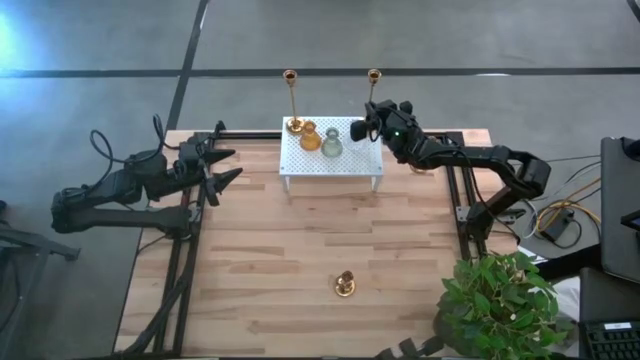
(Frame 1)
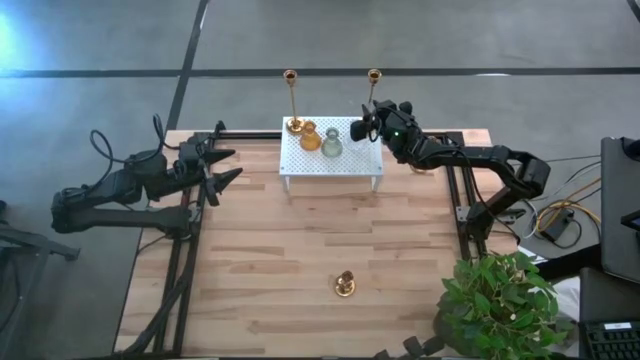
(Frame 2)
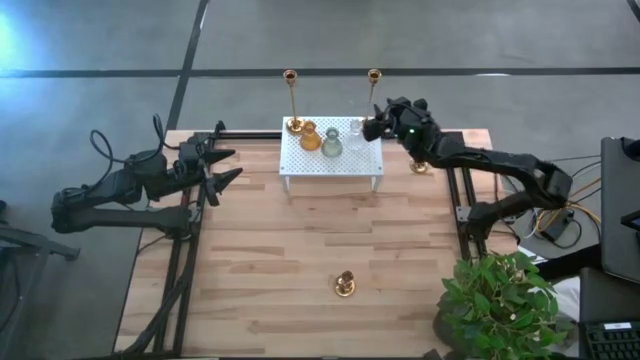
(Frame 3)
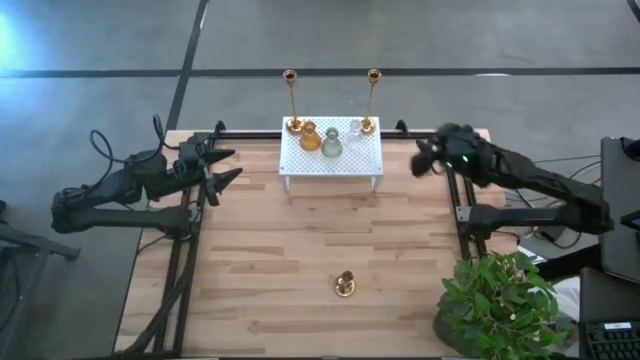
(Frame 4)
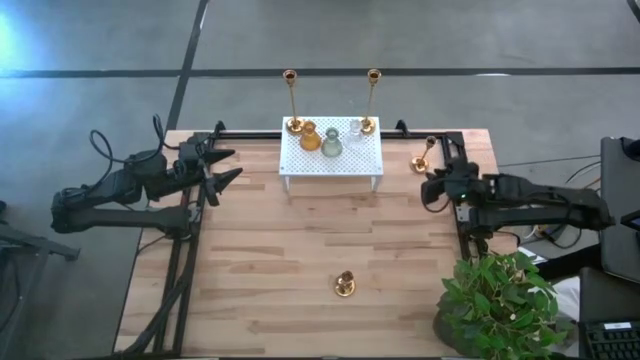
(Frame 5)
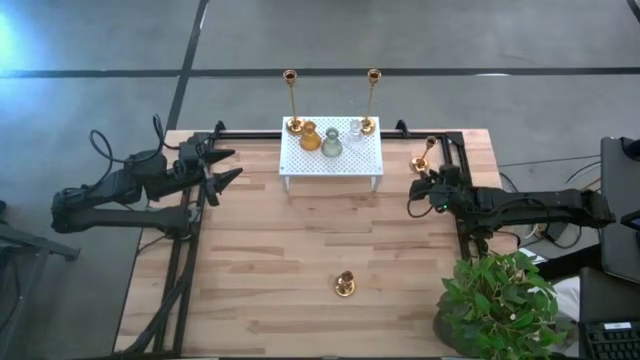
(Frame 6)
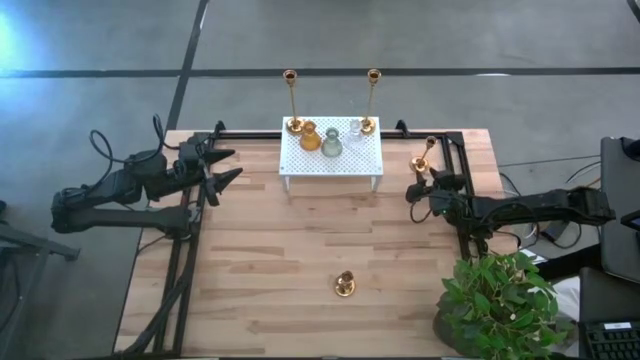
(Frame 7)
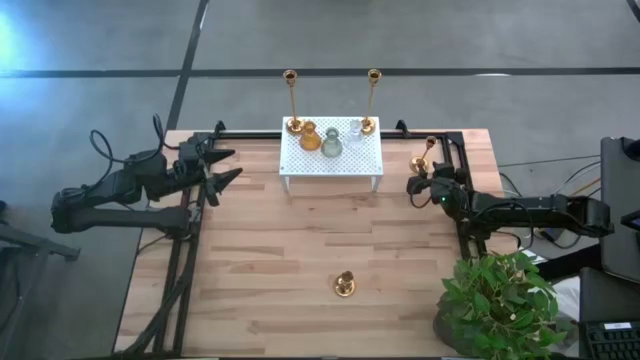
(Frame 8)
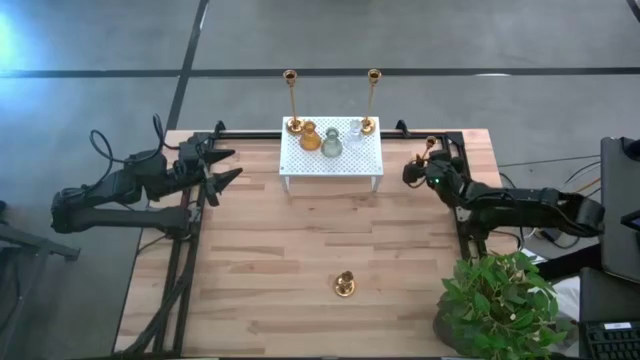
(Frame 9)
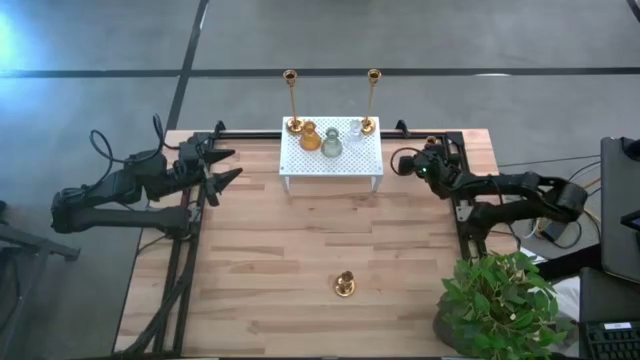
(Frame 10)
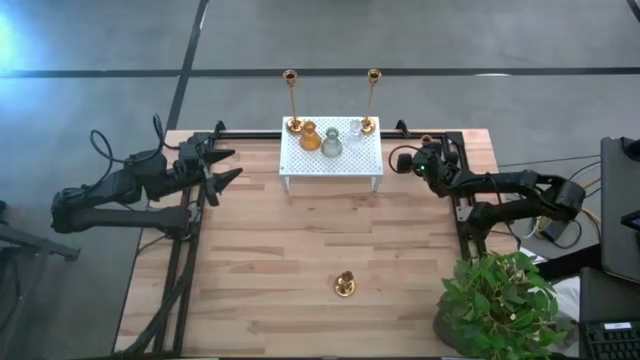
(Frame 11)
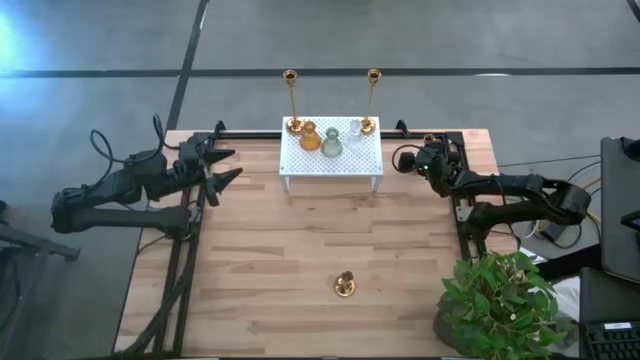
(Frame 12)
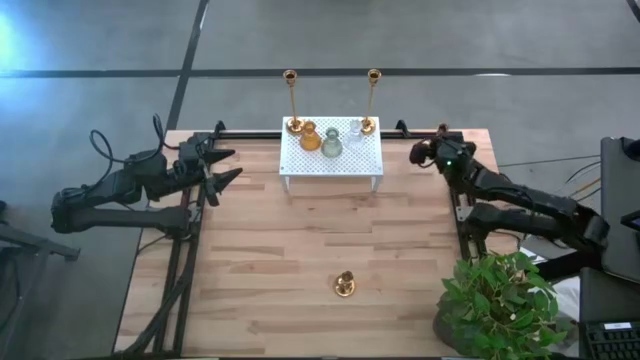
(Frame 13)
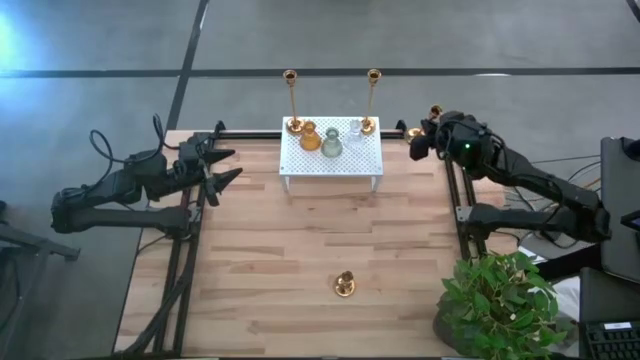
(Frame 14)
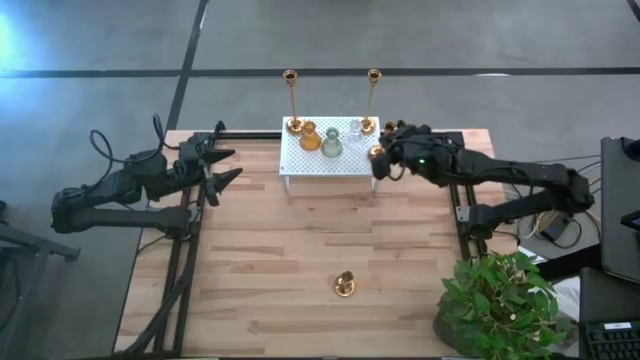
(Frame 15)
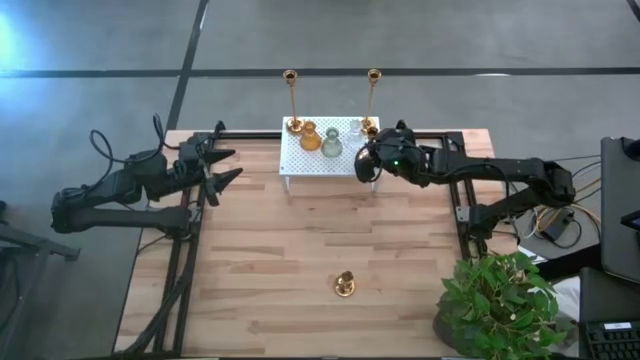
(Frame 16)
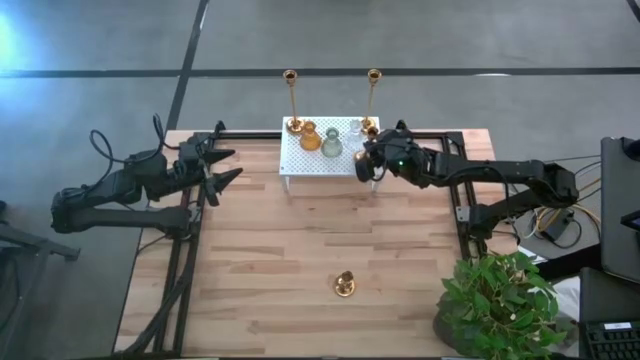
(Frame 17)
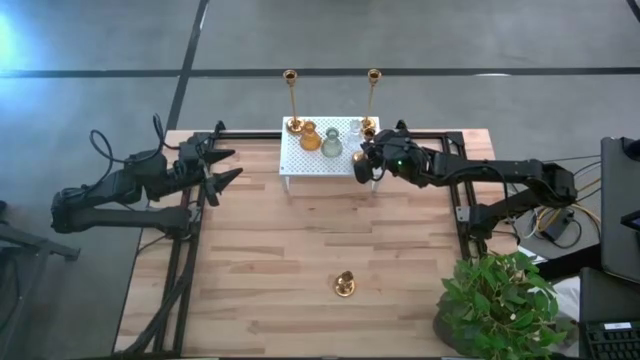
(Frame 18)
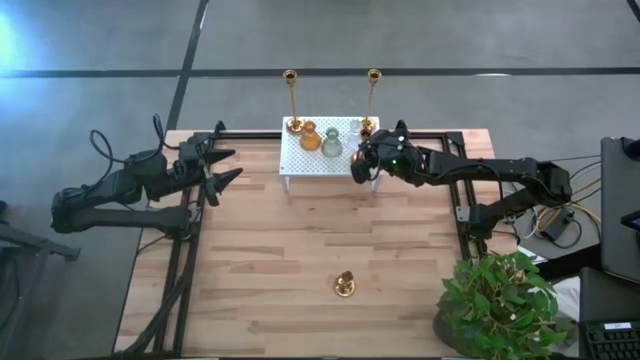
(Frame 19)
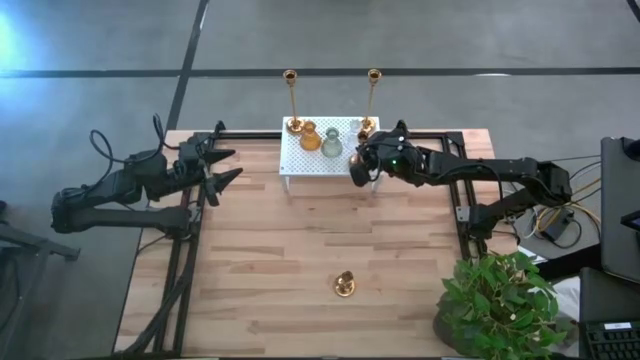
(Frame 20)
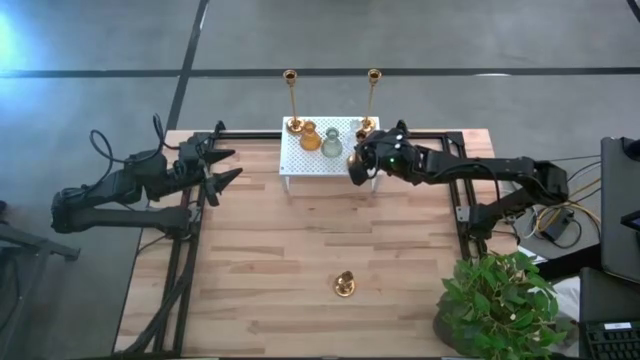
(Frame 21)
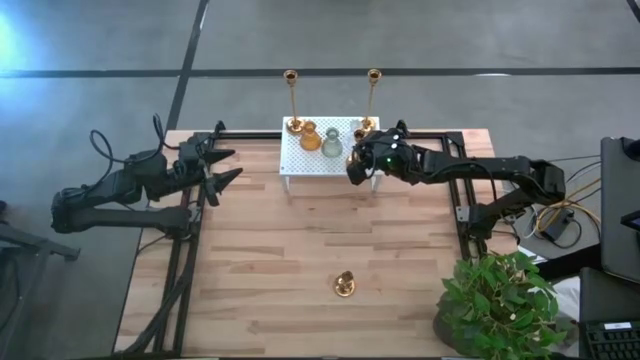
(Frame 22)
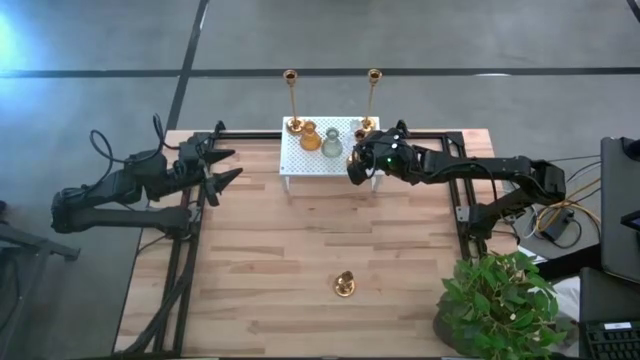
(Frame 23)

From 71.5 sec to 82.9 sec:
Task: Pick & Place candle stick holders
Put the golden candle holder on the shelf

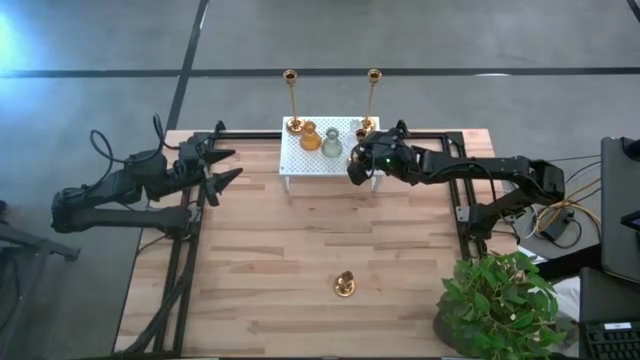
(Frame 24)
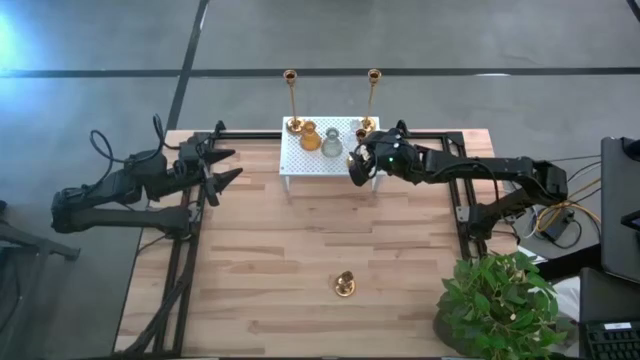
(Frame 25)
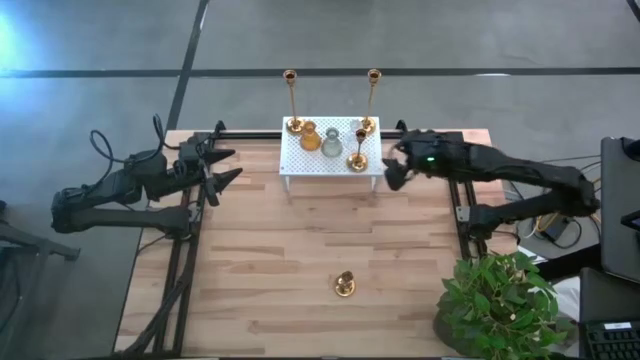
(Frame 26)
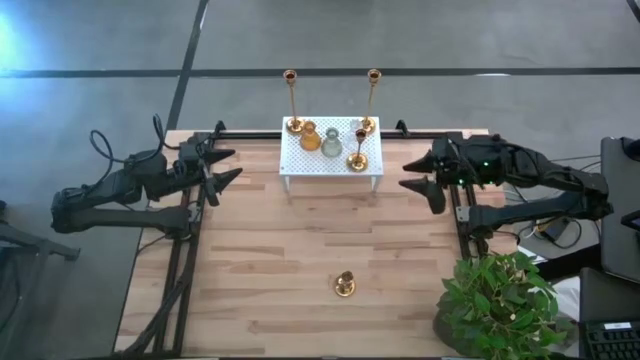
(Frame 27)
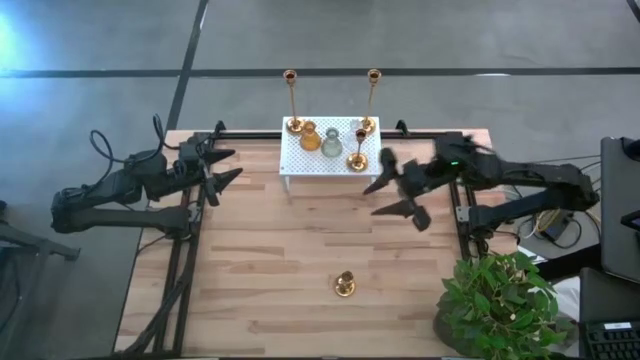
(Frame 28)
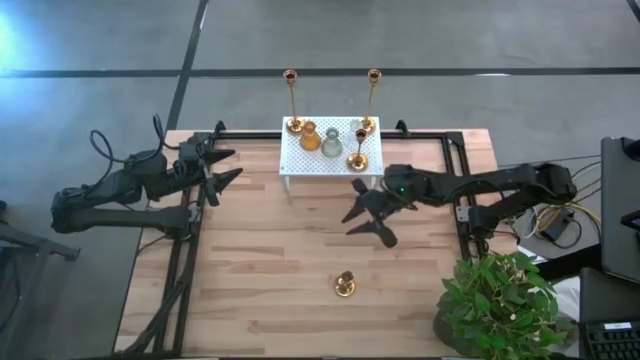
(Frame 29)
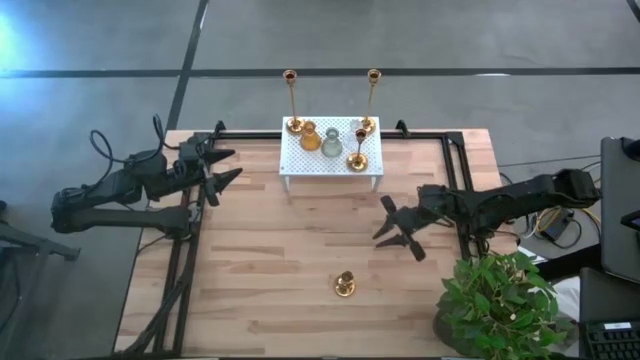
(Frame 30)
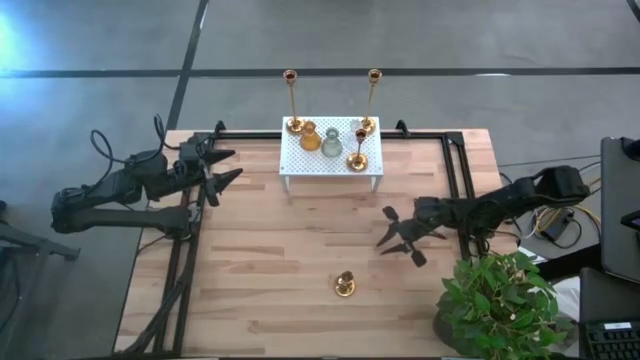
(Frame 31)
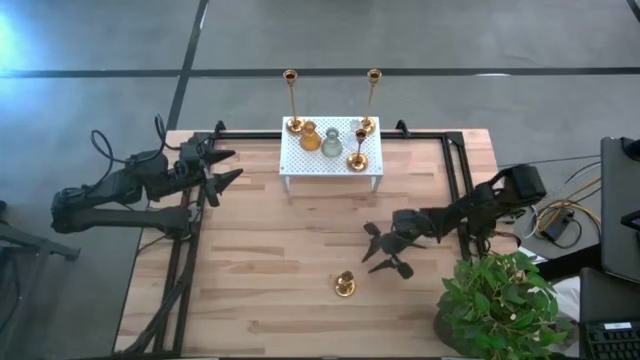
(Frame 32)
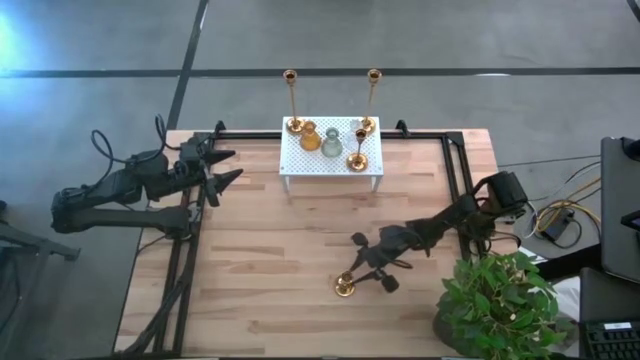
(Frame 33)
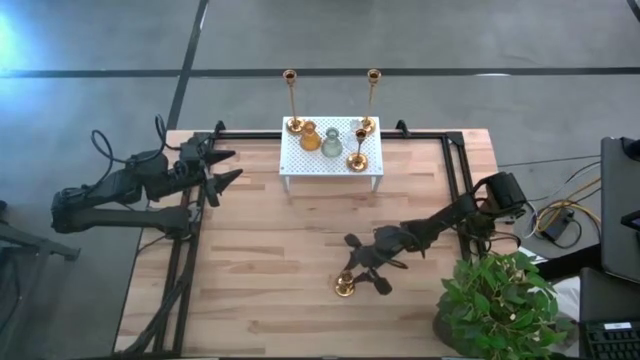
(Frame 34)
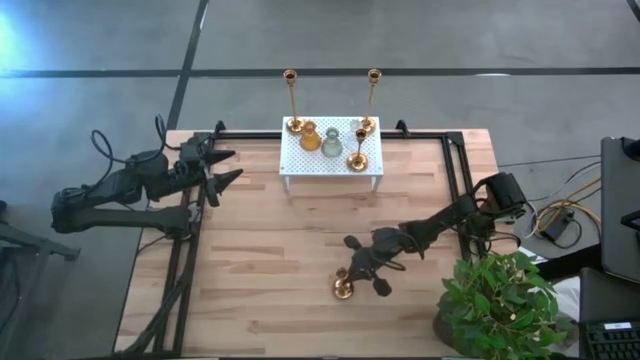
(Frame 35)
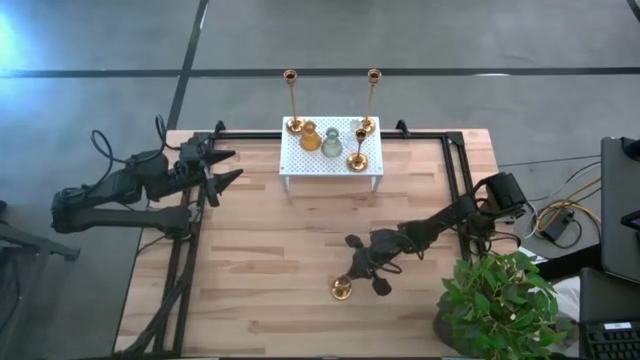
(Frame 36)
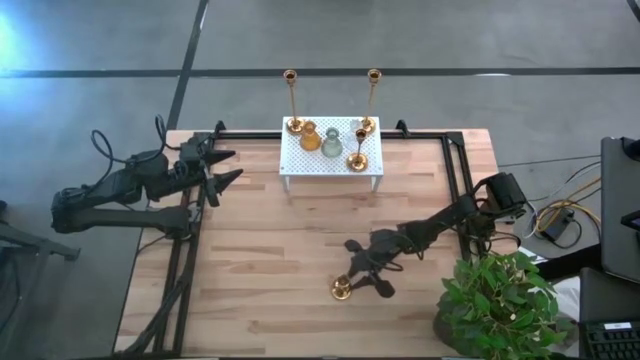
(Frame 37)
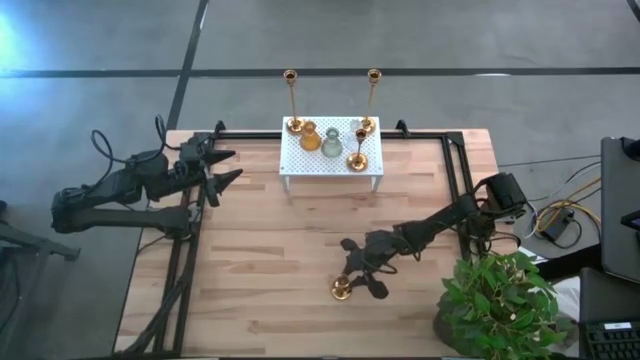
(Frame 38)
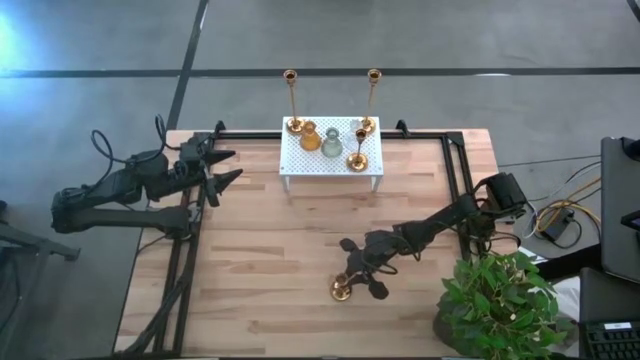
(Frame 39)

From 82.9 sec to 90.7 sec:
Put the golden candle holder on the shelf

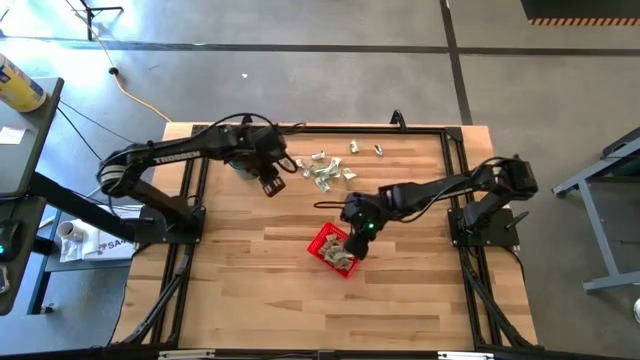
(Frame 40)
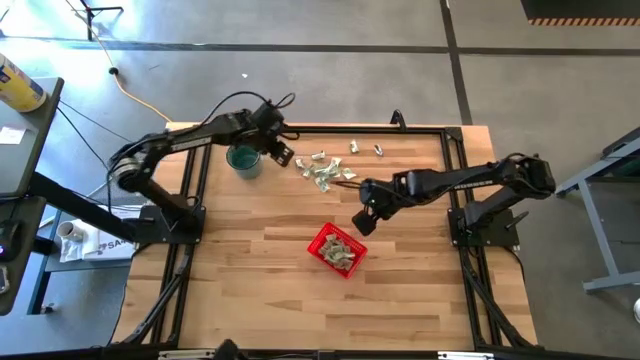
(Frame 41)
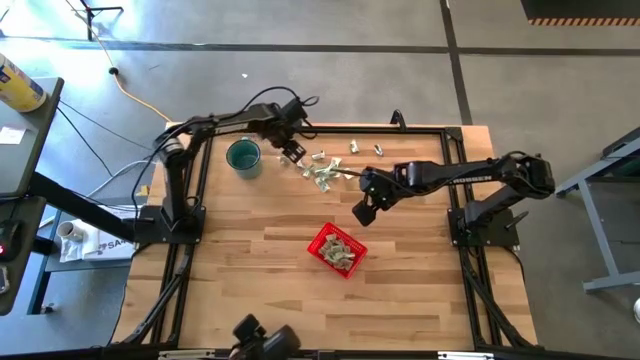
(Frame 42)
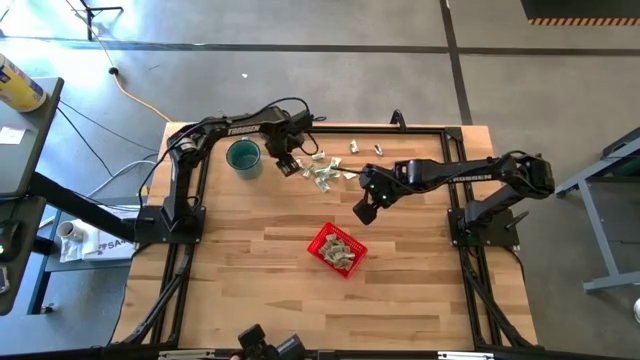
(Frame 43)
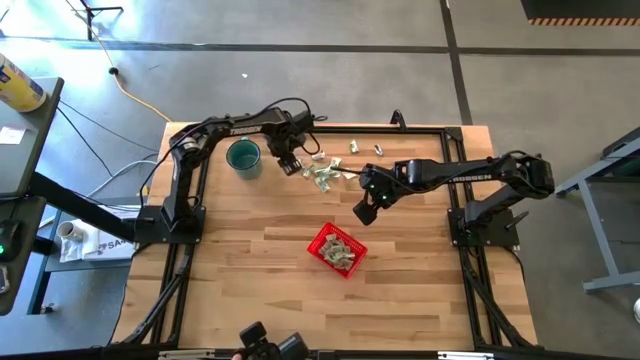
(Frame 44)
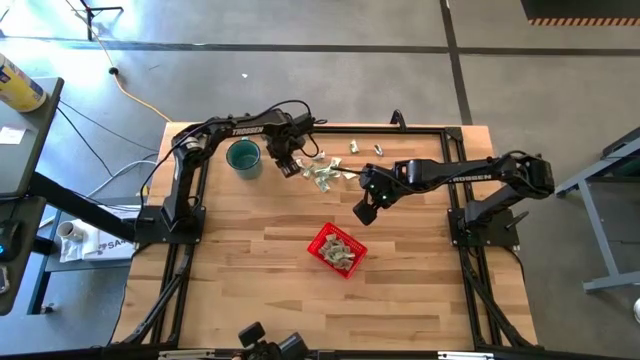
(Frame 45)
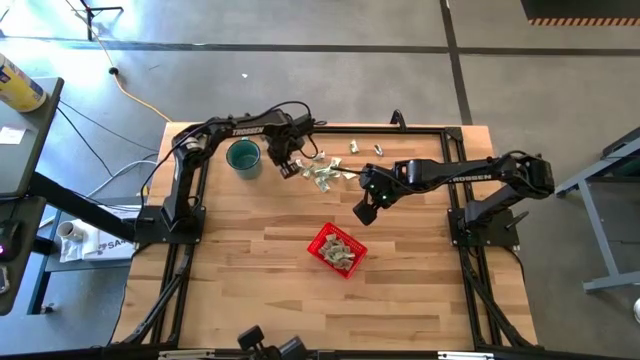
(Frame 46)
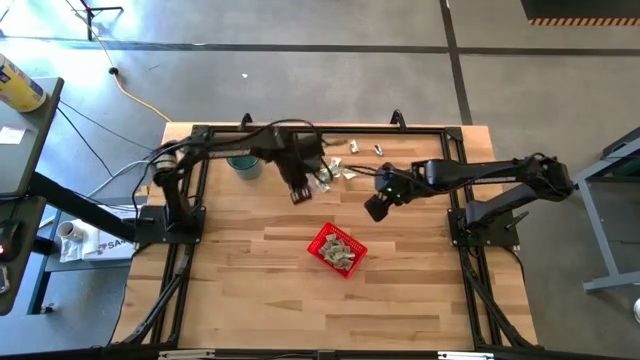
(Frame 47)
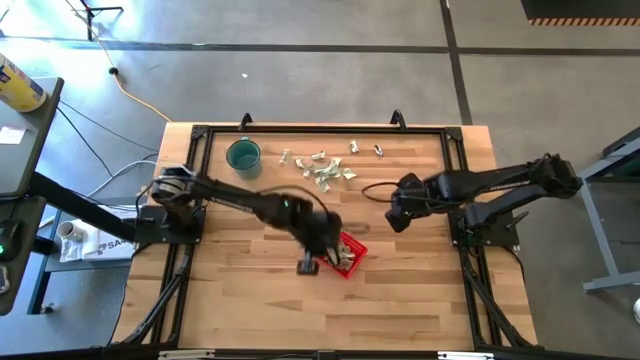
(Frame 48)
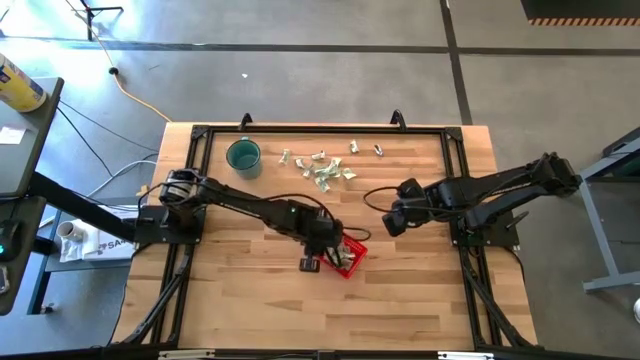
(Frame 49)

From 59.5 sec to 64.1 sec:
Task: Pick and place Stevia / Truvia into bins
Put the light green stevia packet into the bin
